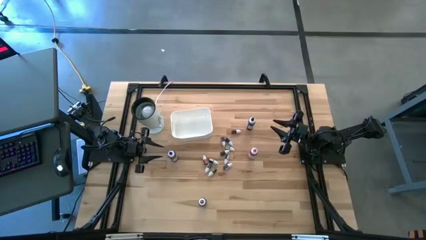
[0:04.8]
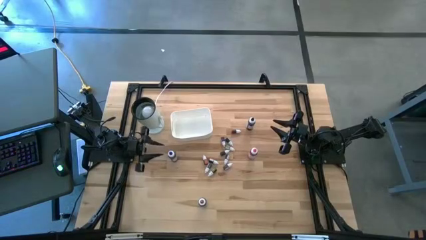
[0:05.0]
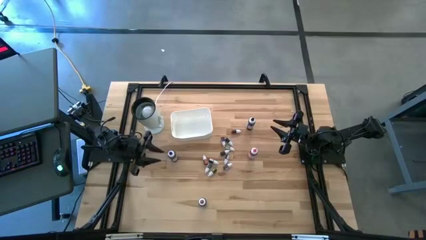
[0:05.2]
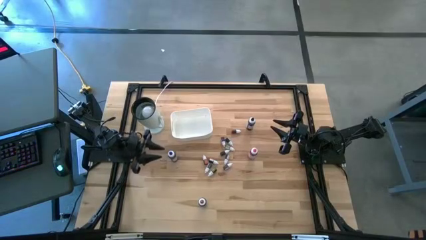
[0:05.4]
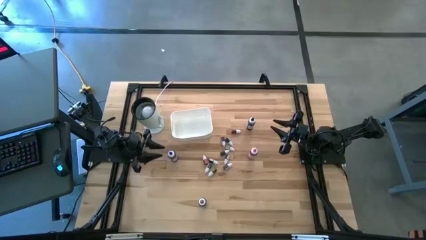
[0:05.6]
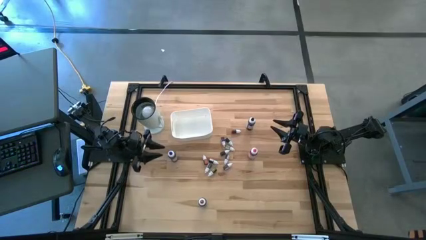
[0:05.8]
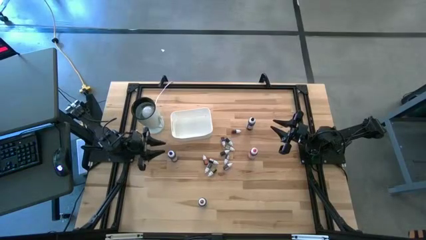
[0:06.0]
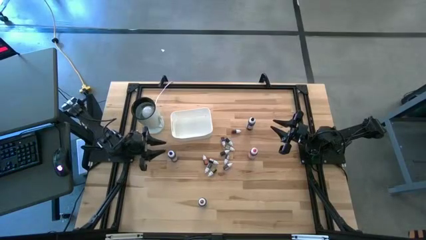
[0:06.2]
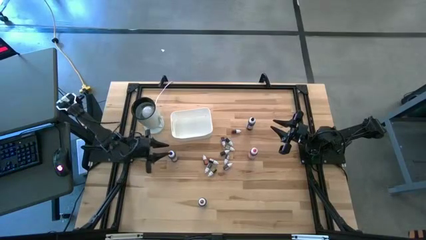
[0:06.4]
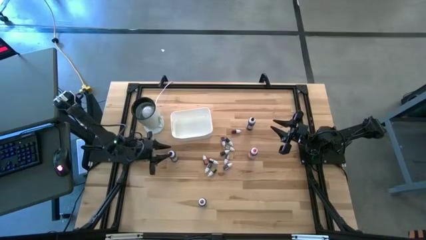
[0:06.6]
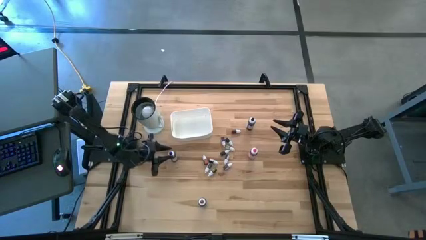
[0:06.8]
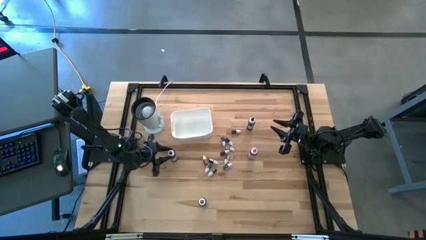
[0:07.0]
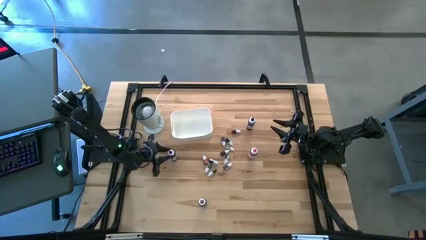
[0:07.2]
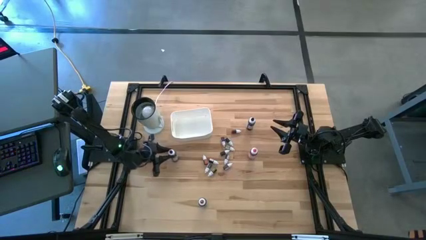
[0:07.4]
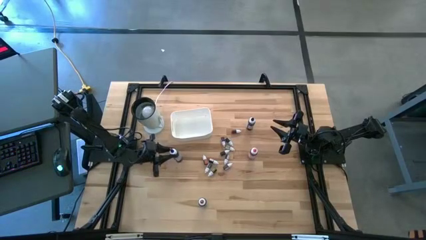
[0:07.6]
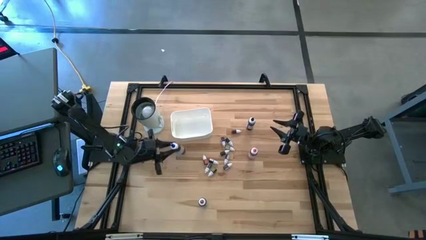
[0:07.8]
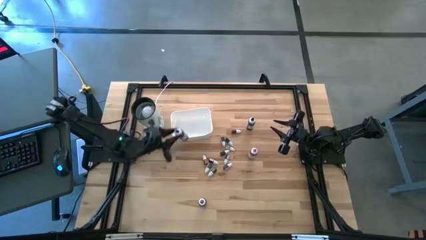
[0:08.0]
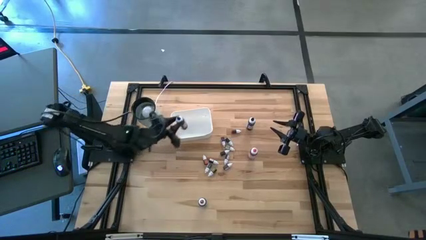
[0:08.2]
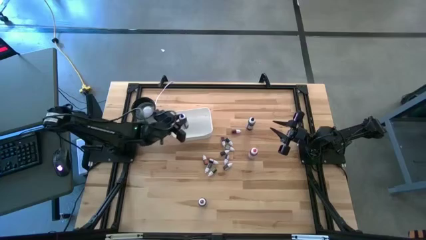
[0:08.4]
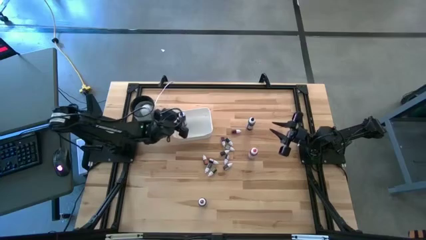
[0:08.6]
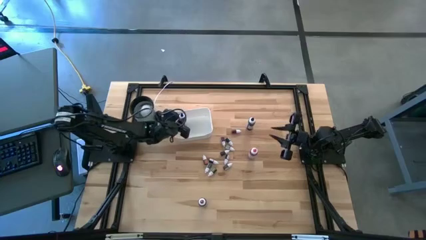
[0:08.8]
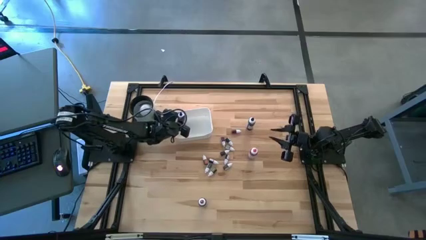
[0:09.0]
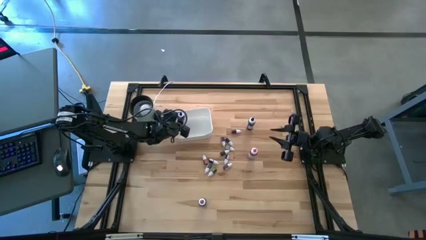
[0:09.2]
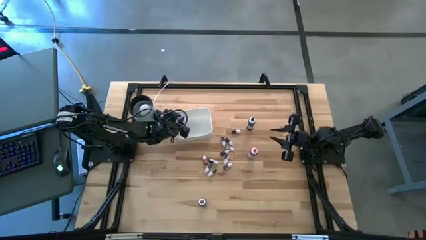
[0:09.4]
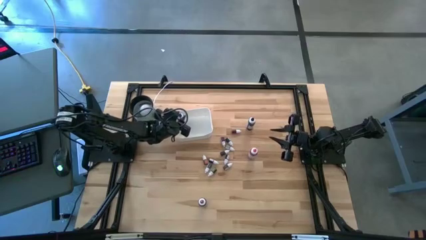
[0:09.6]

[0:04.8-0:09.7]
Task: Pick & Place food coloring
Put the large blue food coloring bottle into the white bin

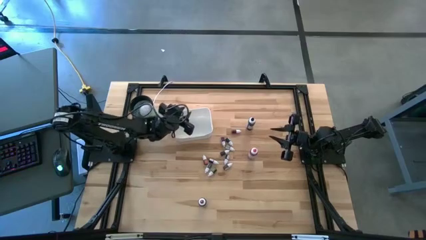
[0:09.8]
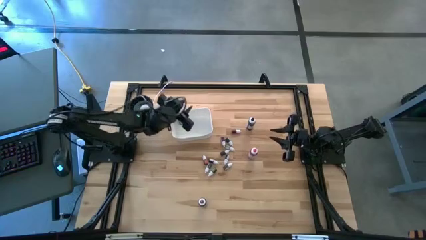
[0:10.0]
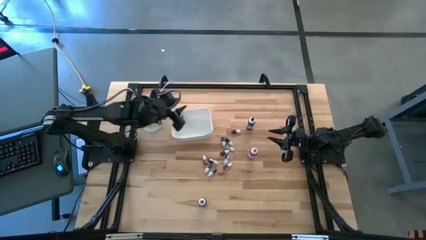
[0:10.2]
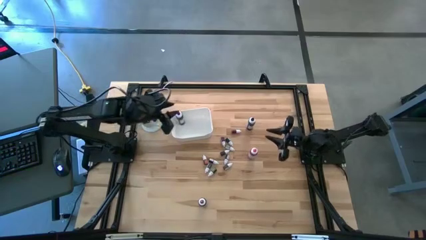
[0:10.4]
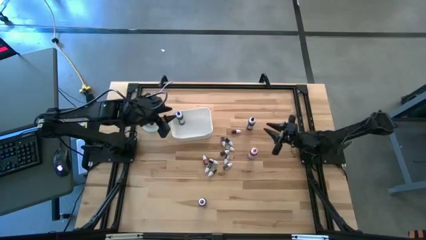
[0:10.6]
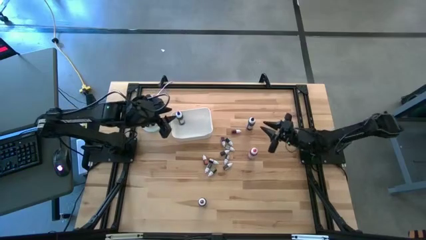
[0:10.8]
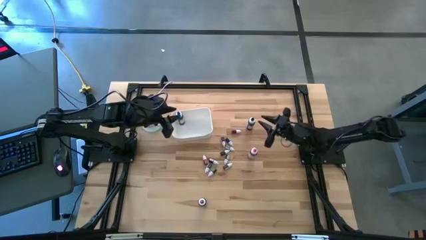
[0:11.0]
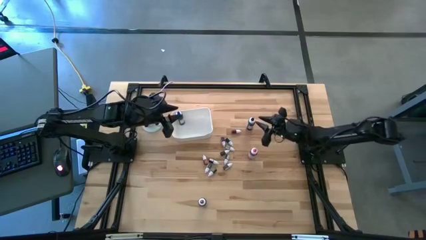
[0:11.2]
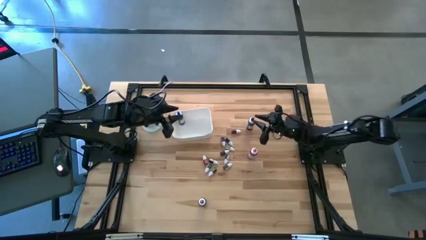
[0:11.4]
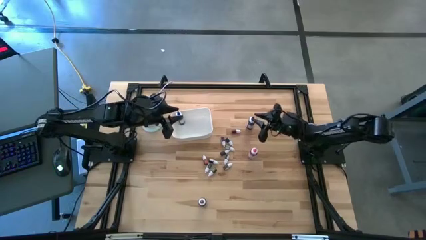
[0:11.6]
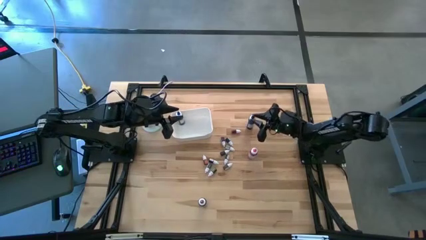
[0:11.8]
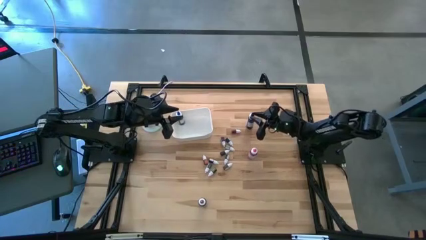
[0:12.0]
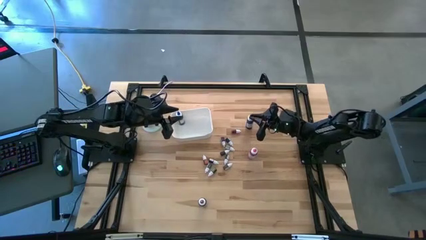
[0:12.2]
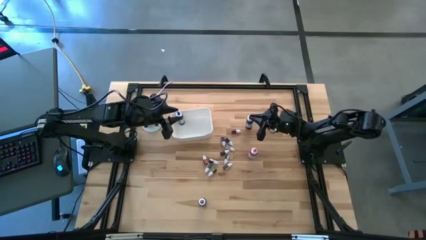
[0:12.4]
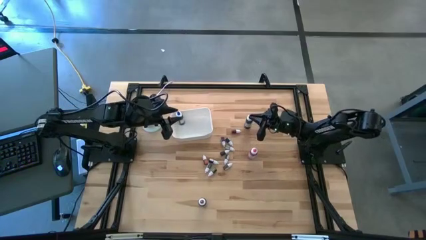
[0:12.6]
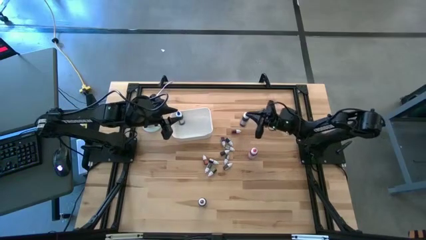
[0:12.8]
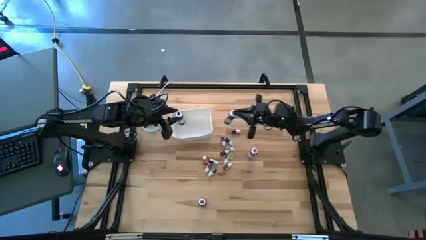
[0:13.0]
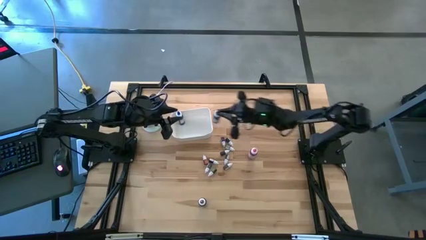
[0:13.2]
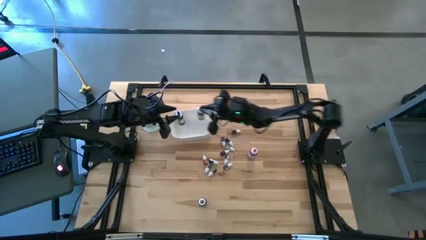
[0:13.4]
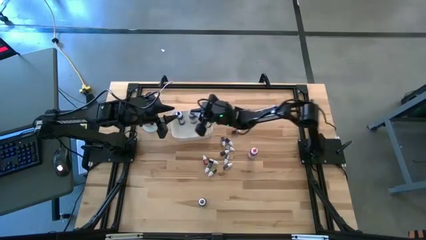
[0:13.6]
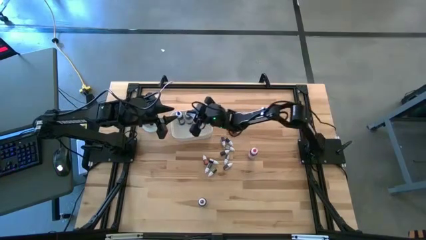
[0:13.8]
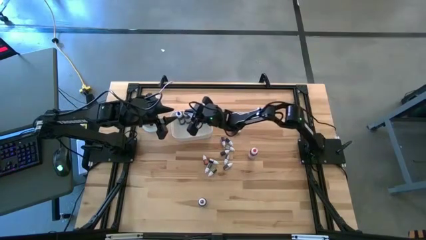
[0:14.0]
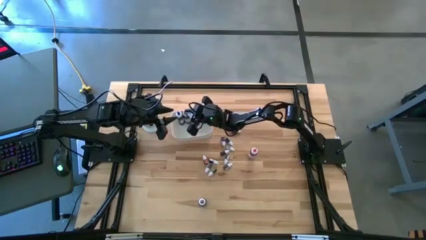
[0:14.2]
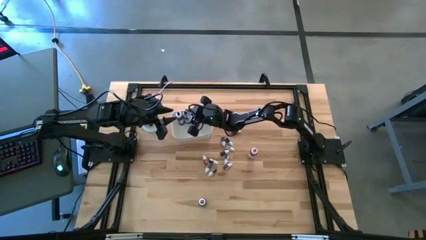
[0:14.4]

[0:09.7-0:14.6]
Put the large black food coloring bottle into the white bin

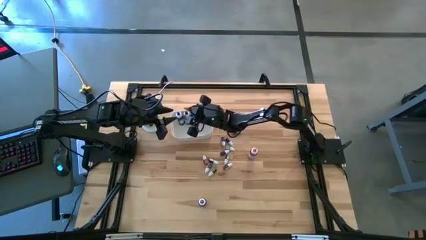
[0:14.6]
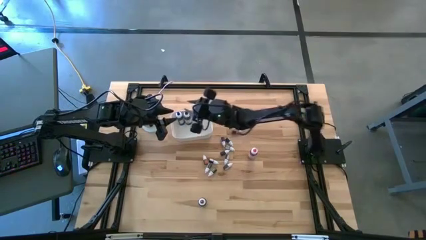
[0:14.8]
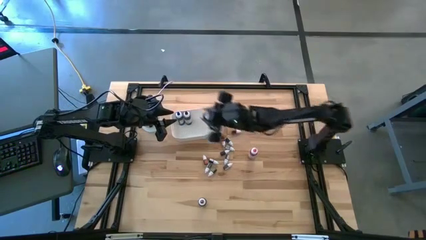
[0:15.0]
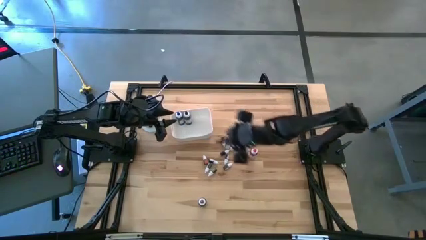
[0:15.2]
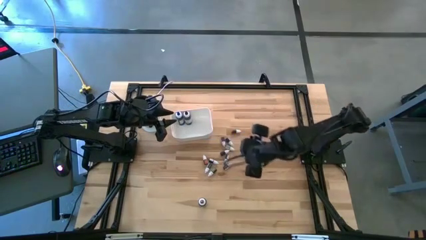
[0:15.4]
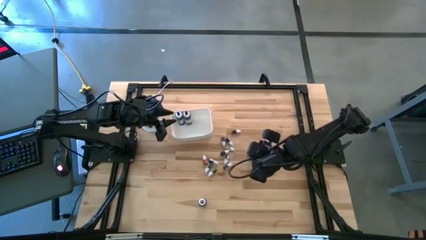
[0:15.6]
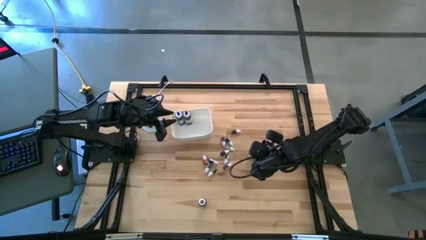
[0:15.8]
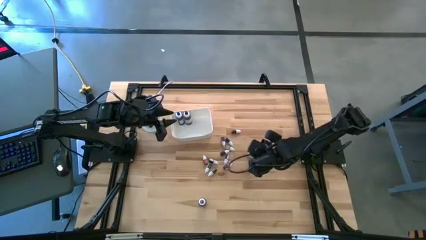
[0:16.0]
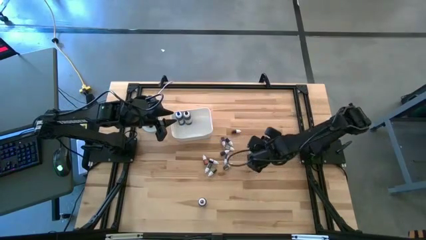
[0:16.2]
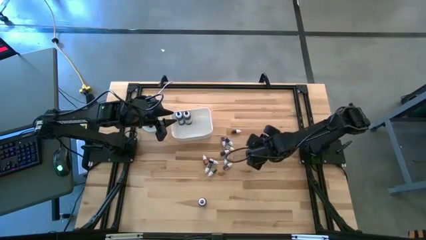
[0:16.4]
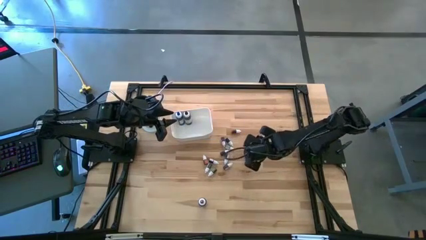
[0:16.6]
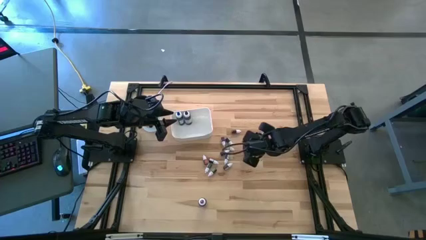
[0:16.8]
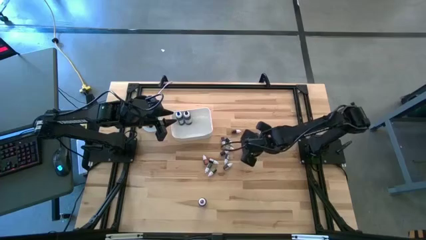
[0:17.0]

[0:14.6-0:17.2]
Put the large pink food coloring bottle into the white bin

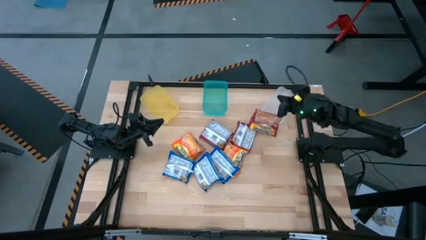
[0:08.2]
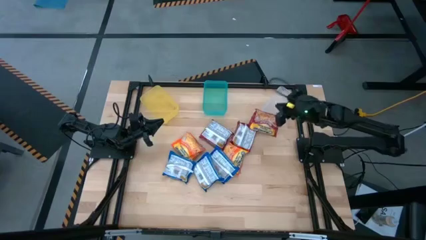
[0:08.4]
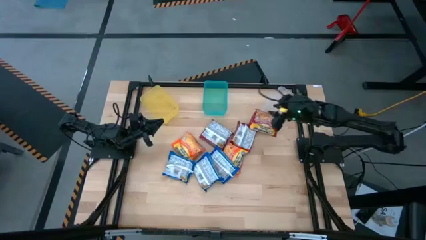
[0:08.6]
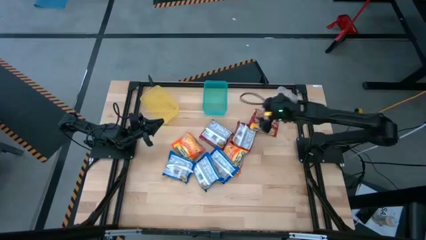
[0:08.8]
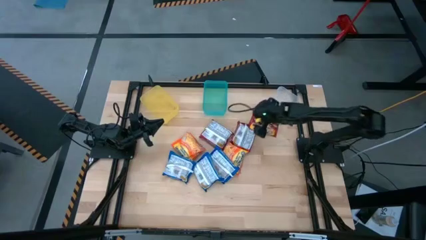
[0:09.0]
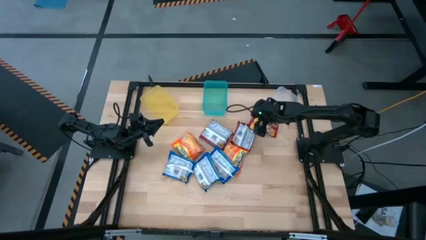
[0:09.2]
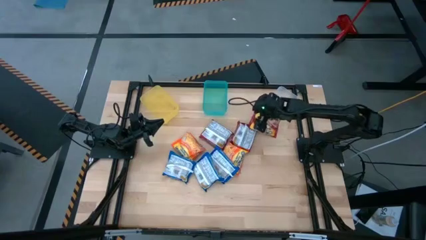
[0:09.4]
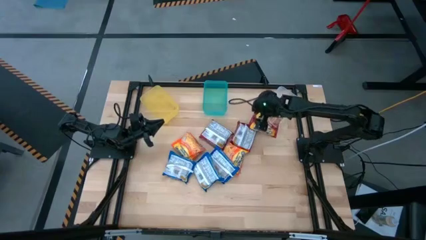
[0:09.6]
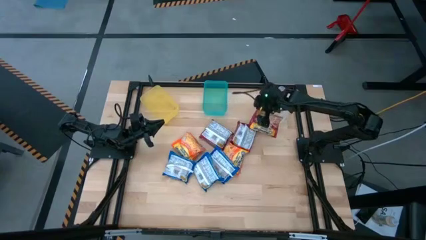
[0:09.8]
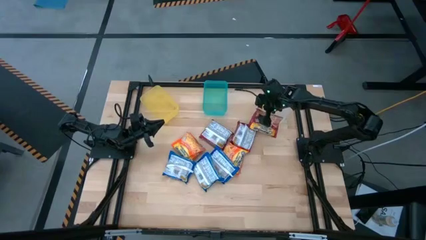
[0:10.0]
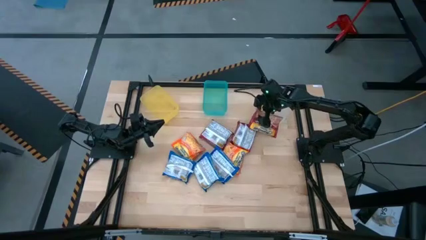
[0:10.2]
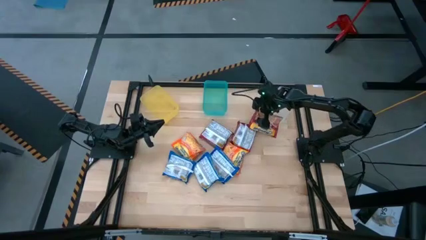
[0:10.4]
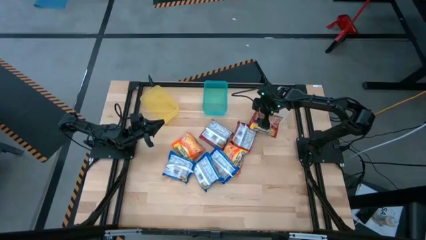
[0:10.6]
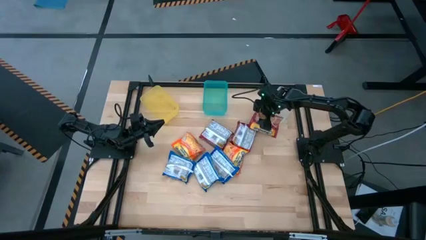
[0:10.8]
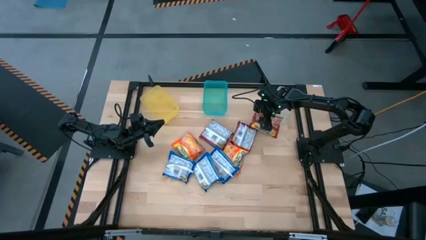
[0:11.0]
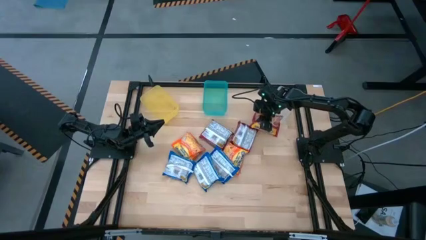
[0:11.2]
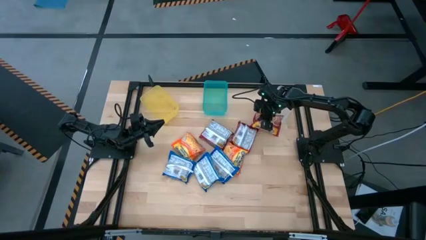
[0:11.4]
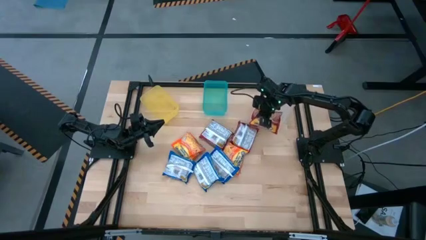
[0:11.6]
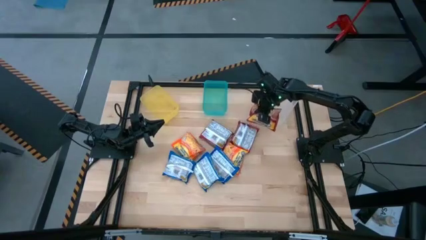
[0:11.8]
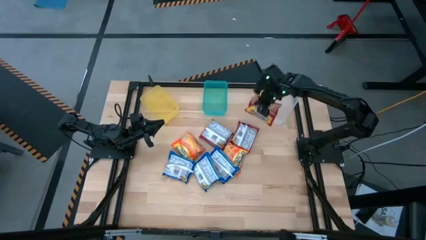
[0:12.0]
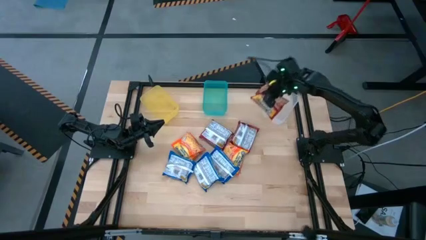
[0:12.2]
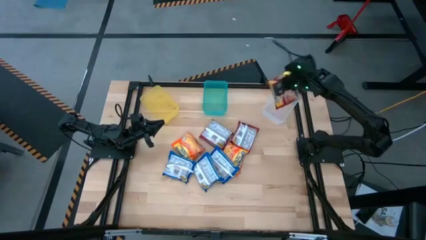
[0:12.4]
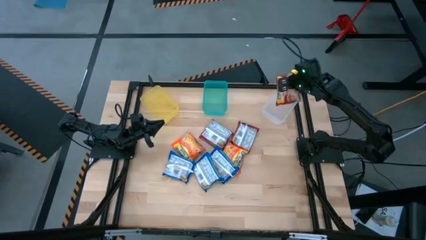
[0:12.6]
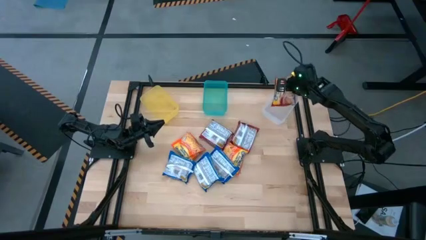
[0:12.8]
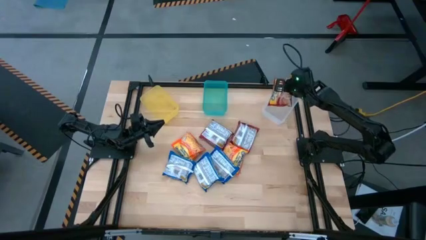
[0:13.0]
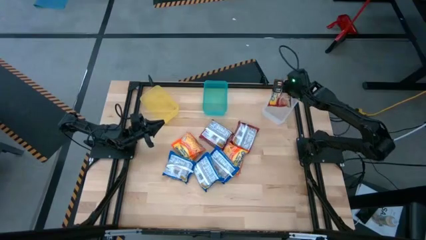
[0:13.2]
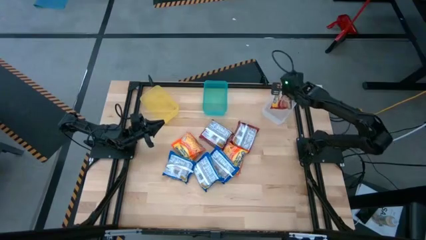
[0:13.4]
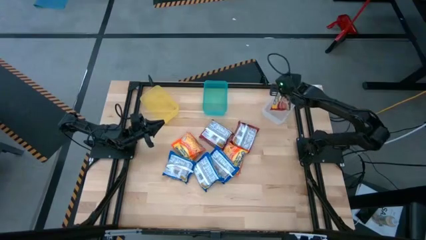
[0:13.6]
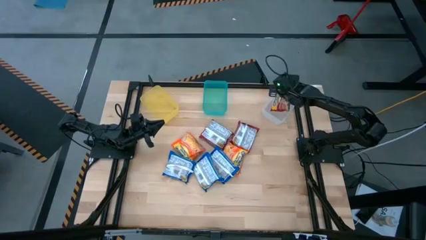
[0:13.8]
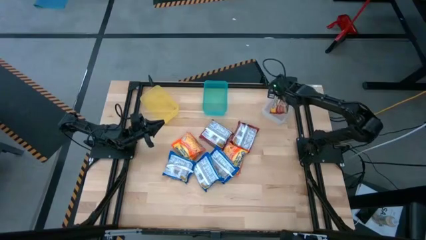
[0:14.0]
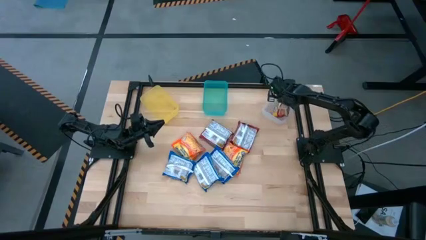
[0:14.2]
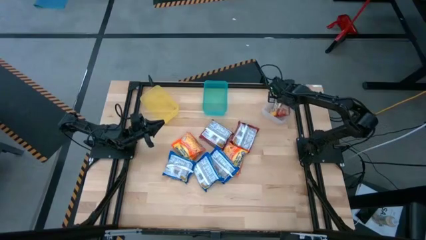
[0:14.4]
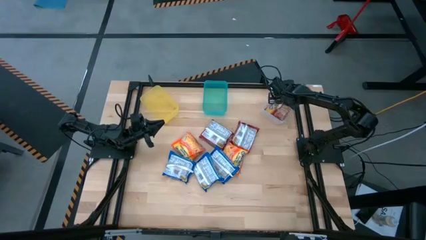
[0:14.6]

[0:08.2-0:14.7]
Task: Sort Maruchan noodles
Put the bottom red noodle pack into the transparent bin
